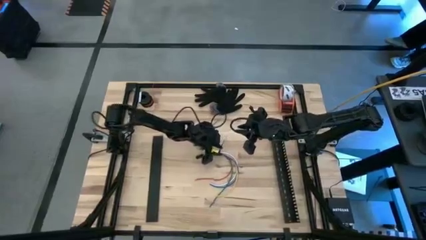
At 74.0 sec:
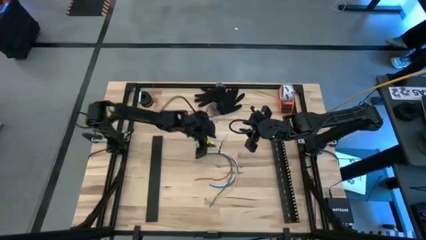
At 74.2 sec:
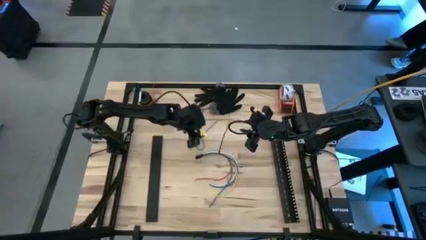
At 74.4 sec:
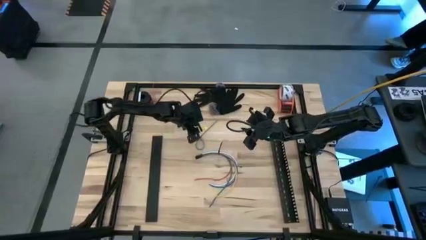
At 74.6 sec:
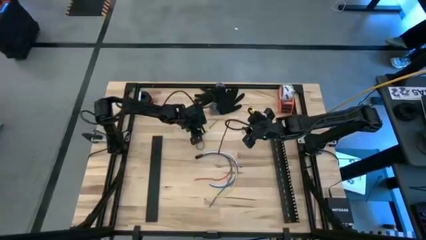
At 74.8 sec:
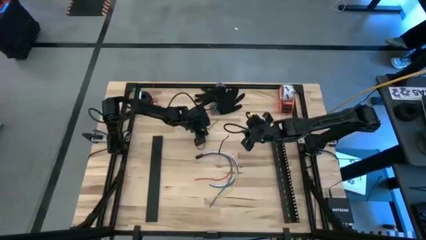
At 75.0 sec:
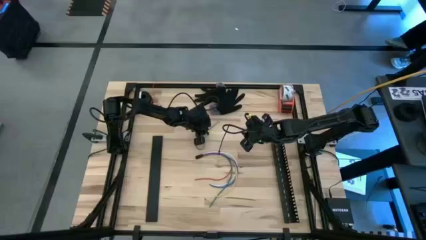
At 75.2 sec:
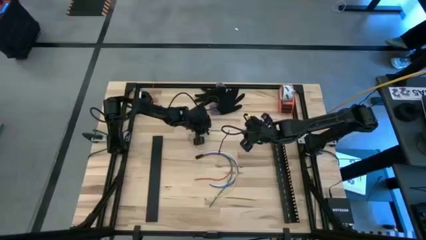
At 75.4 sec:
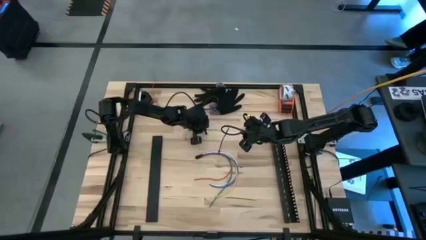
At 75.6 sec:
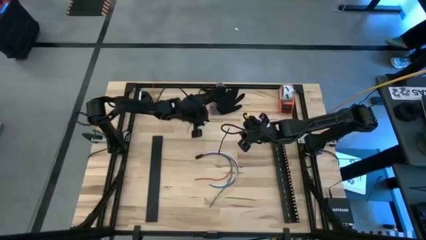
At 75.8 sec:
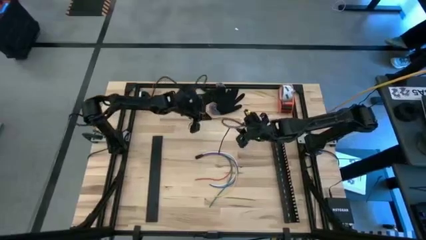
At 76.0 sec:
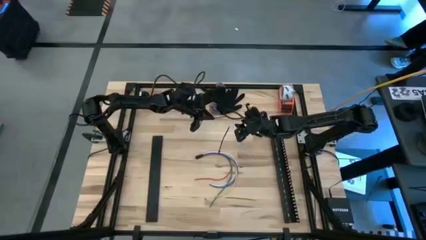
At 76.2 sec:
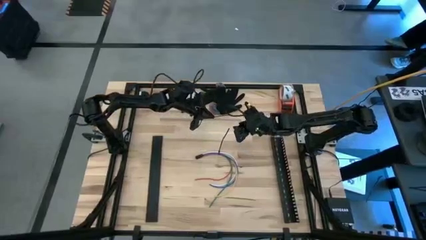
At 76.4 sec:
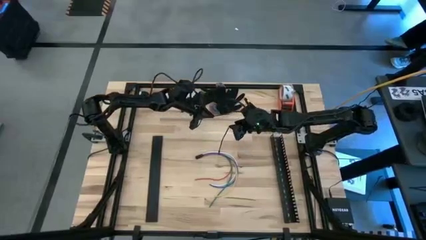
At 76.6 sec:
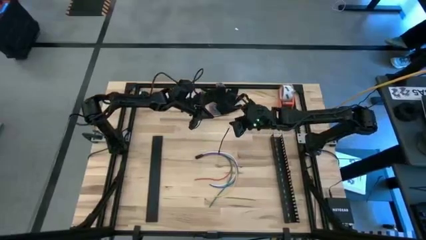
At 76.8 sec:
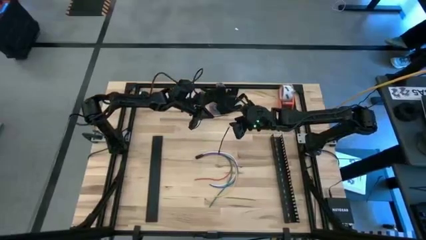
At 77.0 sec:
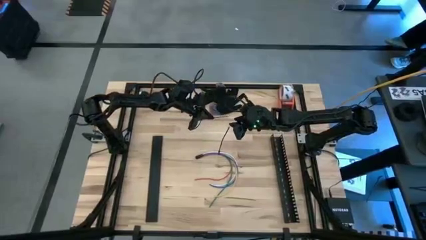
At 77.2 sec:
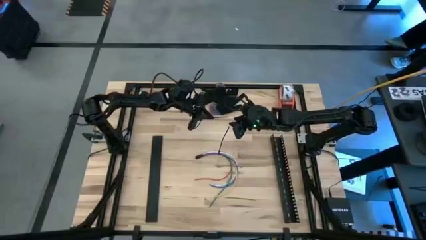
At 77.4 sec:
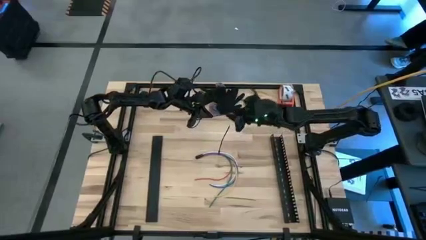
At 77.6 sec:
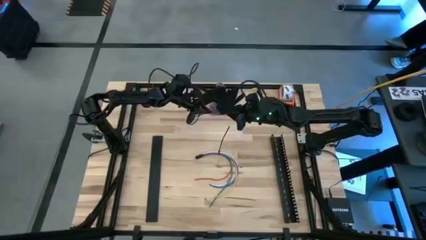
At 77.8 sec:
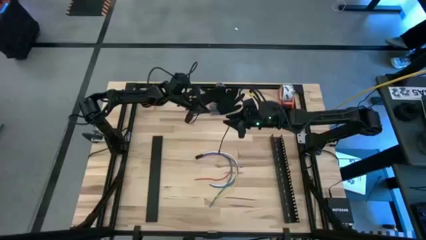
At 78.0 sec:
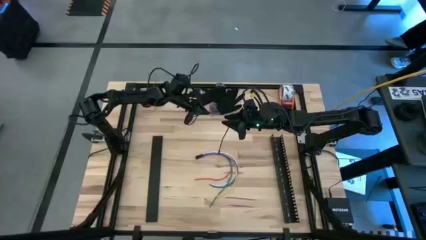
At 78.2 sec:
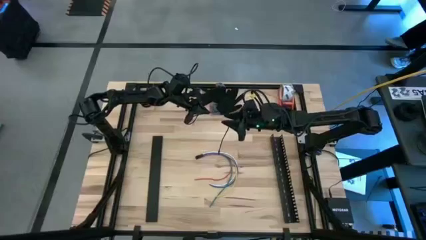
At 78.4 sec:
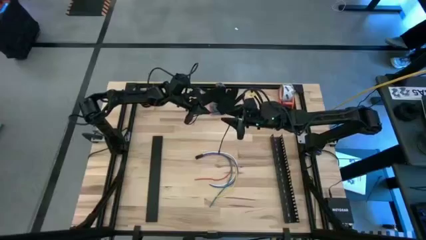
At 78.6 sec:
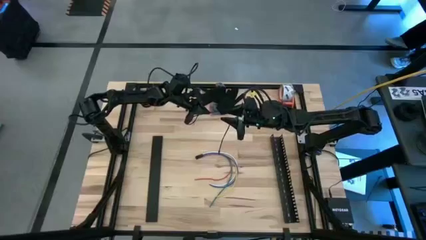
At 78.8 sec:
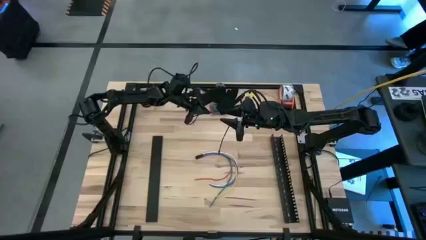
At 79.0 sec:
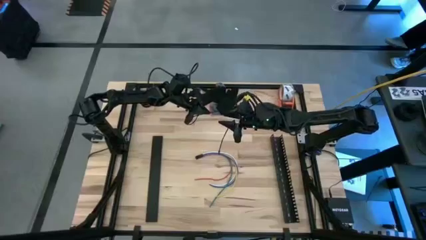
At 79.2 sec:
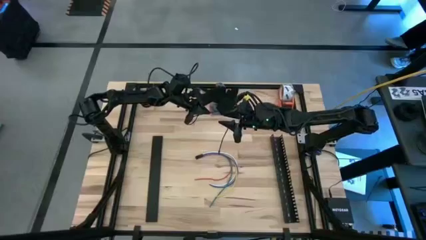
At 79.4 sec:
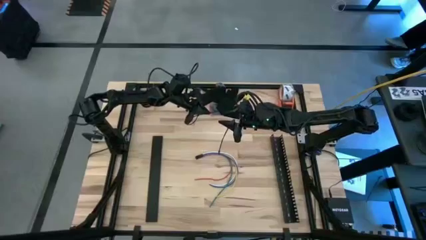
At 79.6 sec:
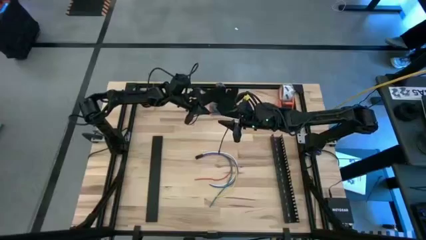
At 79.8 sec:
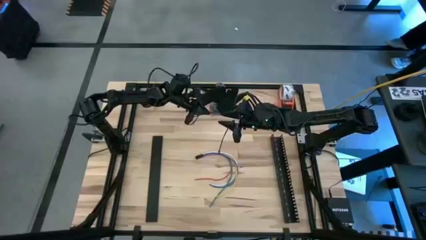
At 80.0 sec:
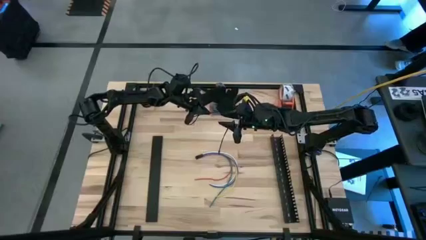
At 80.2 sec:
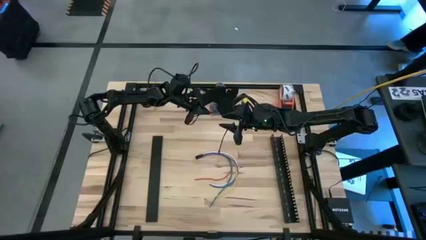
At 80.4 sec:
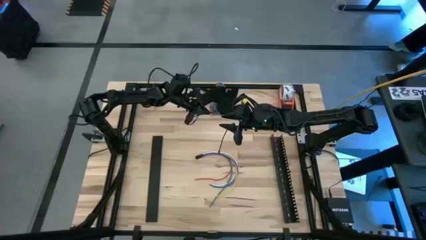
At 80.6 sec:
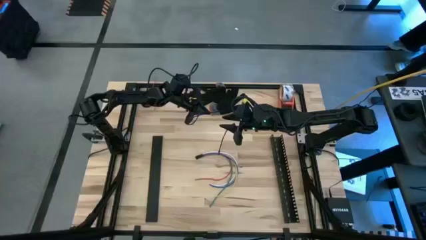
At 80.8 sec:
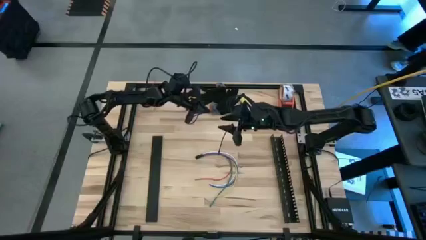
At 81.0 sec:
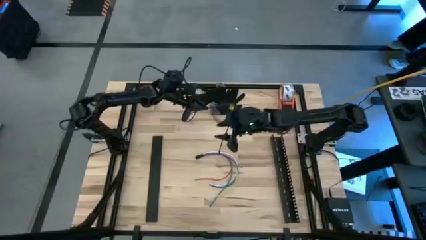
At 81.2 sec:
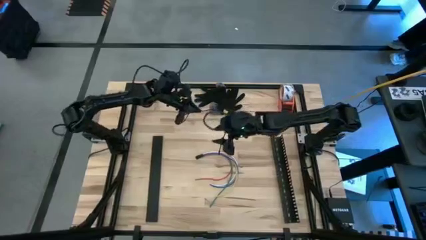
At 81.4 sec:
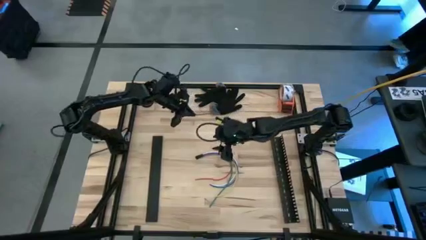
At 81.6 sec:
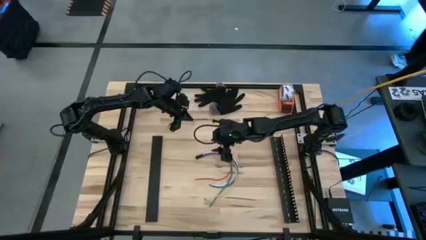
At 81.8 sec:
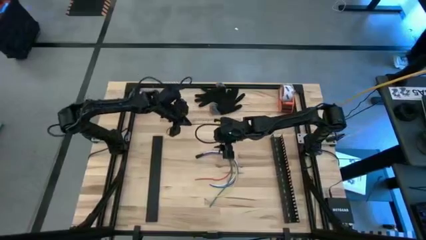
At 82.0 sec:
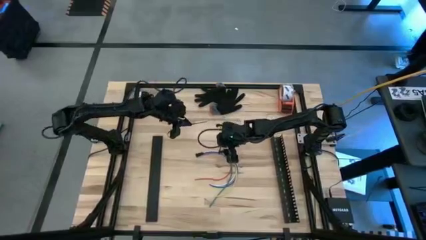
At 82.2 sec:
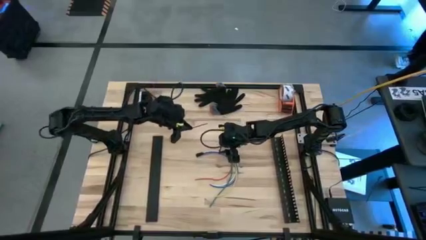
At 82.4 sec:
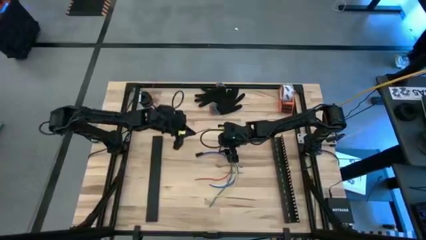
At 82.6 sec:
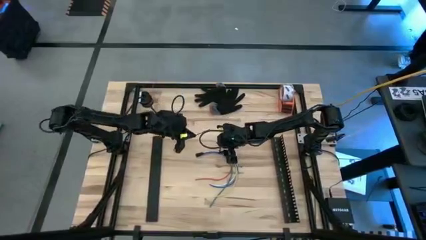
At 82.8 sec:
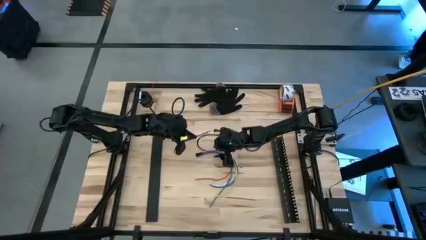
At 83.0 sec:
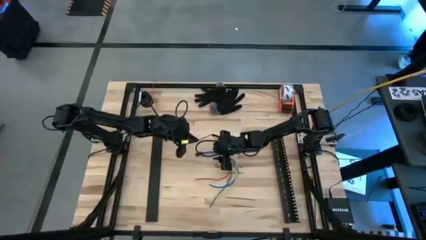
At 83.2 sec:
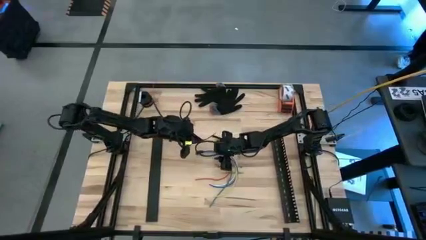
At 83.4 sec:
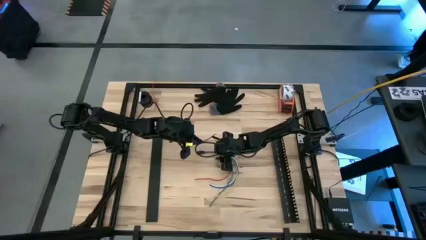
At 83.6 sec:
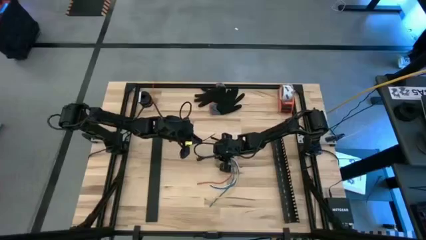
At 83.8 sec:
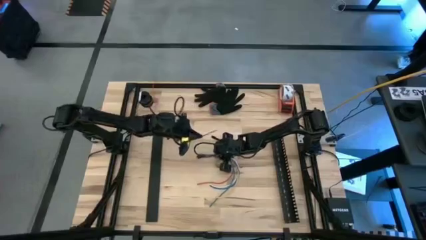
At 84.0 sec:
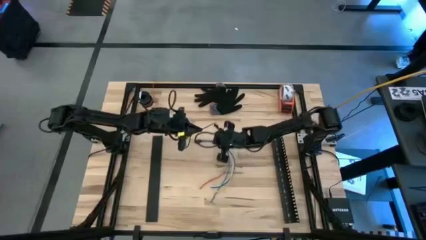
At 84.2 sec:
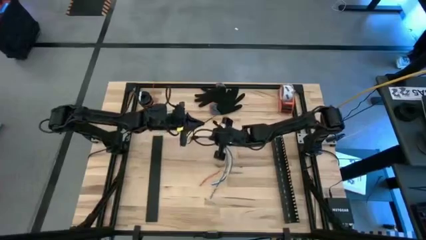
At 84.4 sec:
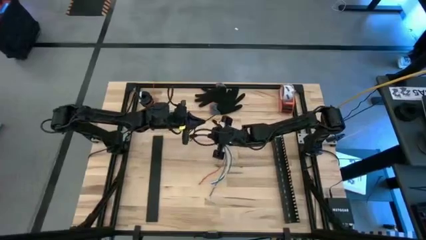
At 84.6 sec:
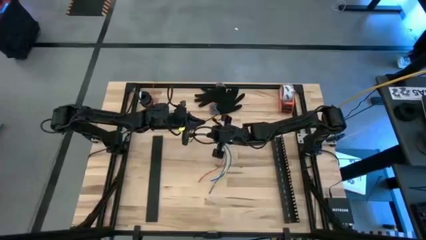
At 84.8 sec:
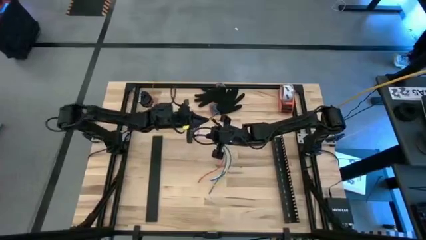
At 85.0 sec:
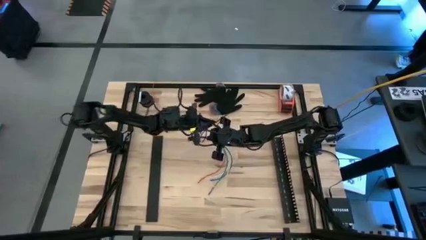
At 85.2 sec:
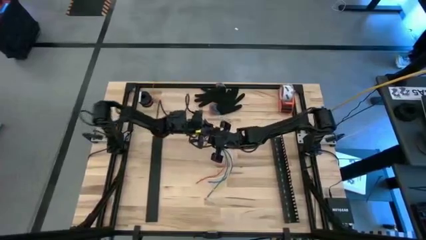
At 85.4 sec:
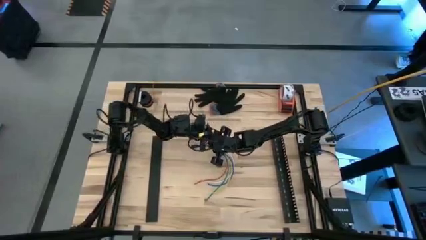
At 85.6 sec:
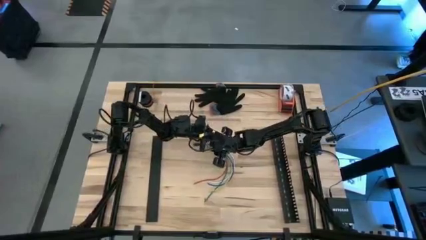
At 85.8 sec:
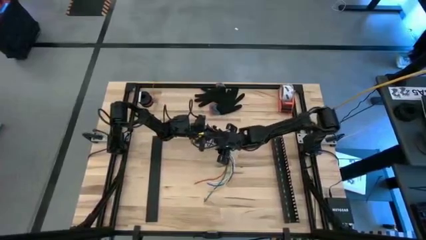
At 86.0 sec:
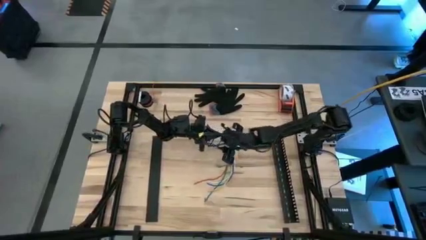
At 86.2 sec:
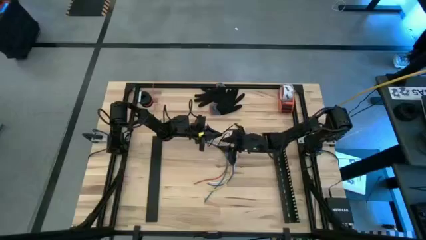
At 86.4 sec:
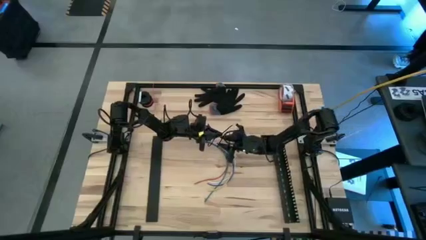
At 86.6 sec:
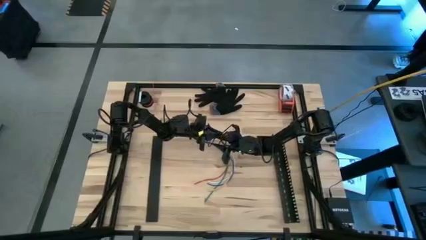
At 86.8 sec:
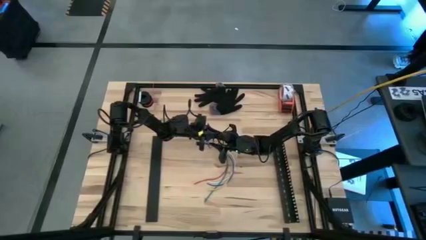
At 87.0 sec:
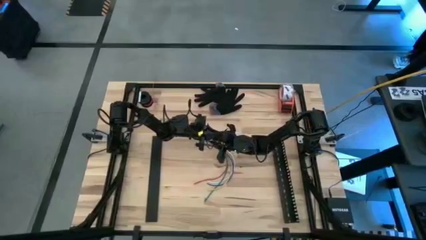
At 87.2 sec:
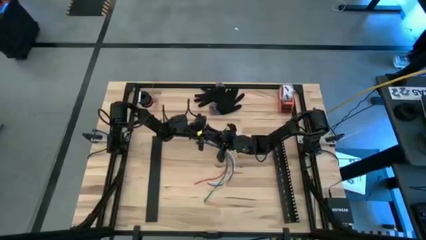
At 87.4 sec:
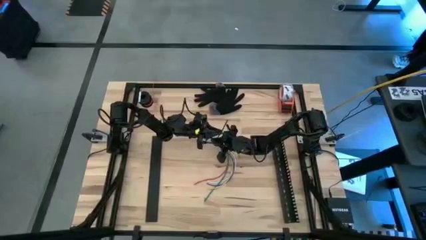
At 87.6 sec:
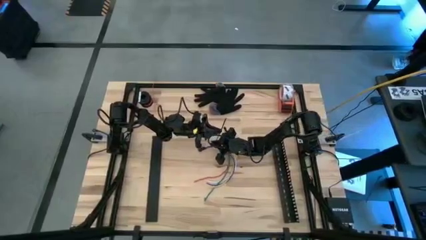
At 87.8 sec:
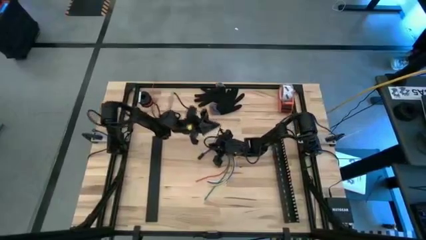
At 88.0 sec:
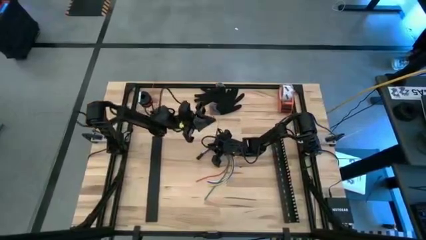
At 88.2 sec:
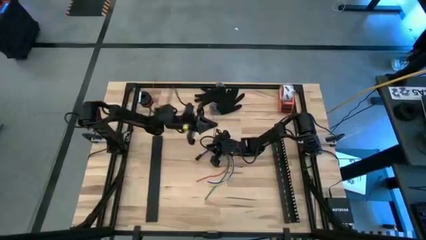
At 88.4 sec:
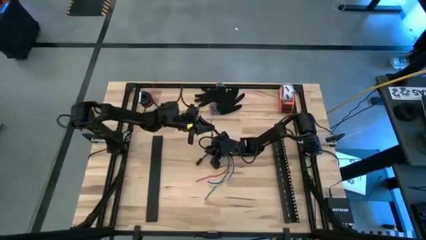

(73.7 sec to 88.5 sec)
Task: Ziptie cables
Wrap the cable wires with the black ziptie

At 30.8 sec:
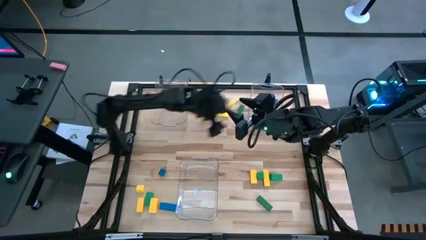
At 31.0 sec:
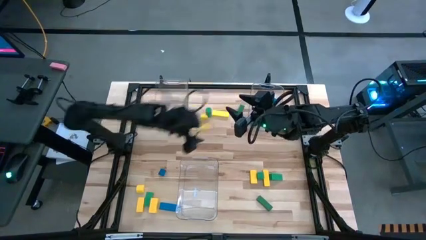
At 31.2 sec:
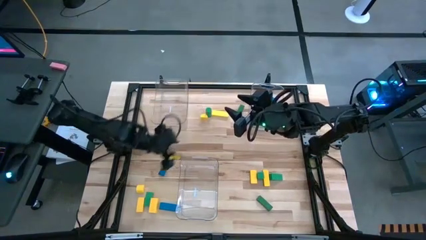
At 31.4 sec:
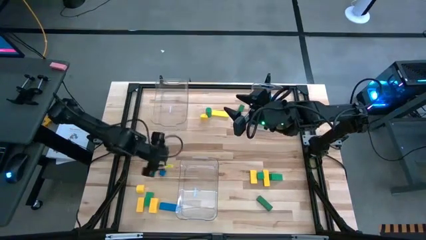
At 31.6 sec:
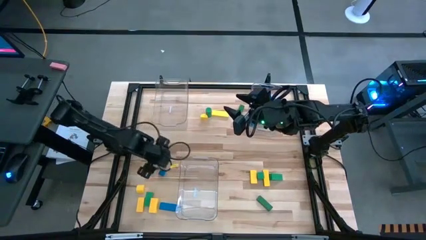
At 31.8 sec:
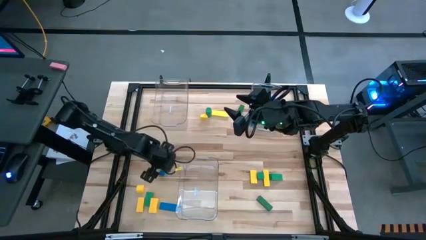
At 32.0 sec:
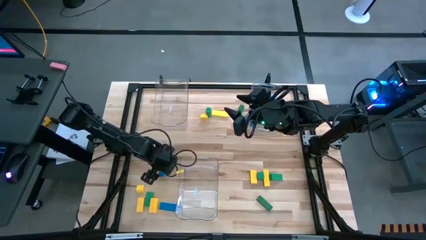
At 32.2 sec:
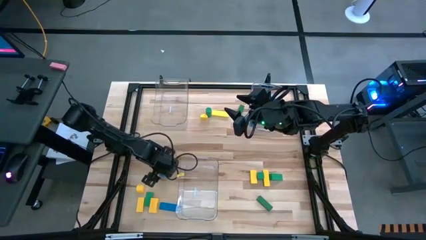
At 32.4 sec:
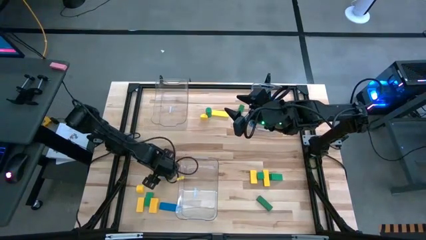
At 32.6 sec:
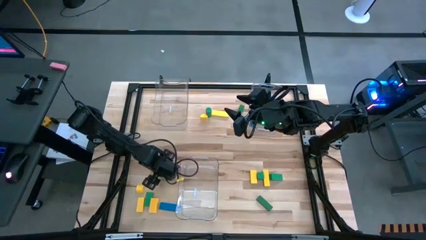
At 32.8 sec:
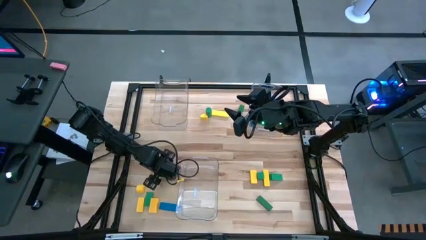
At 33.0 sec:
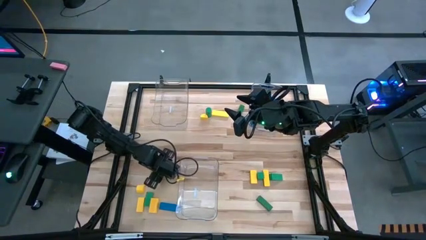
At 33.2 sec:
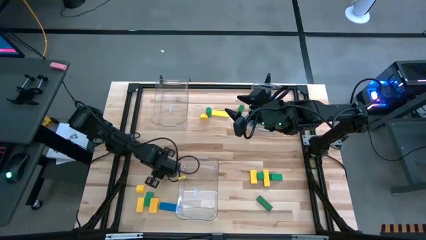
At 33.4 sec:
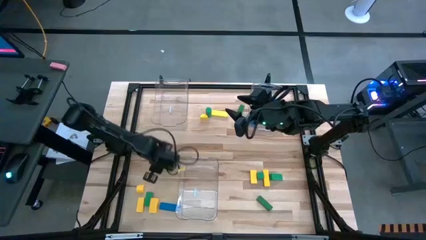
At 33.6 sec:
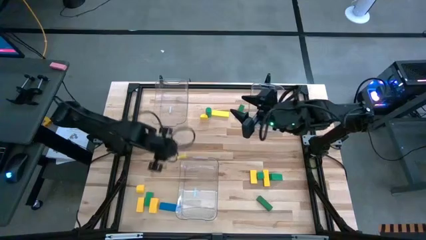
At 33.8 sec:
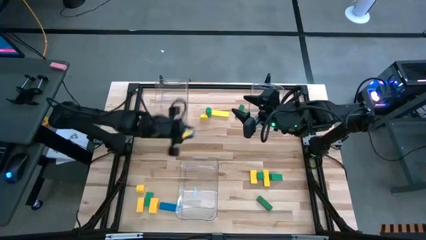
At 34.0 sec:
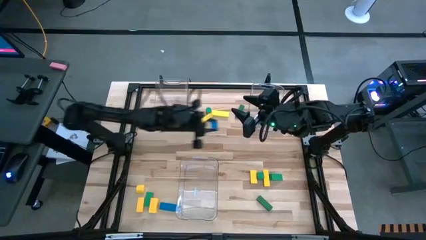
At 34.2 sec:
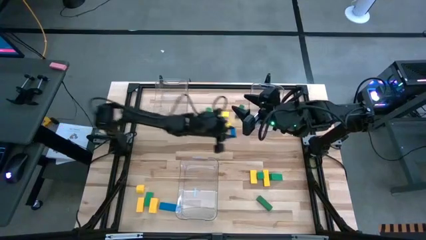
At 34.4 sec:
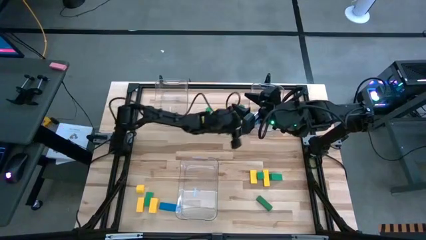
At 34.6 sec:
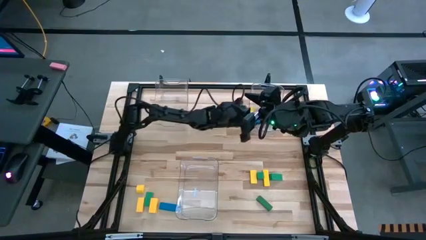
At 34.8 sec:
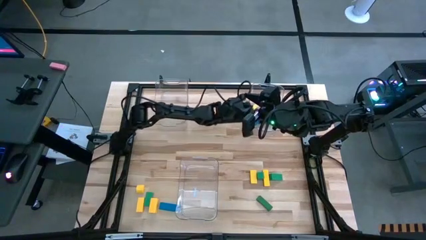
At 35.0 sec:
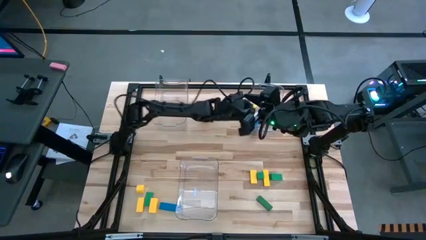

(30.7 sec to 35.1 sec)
Task: Sort blocks
Put the blue block into the top right transparent bin
